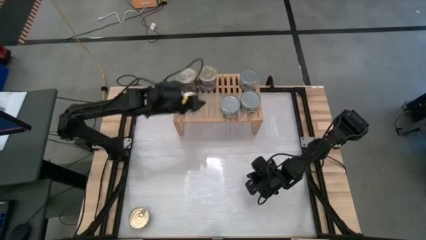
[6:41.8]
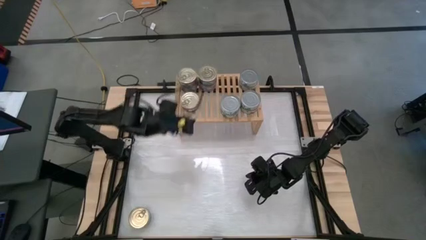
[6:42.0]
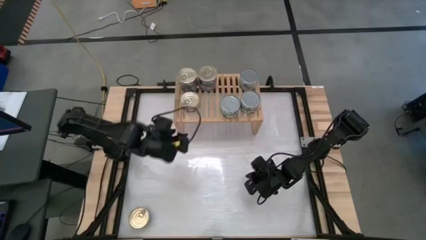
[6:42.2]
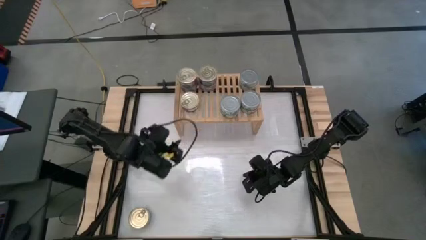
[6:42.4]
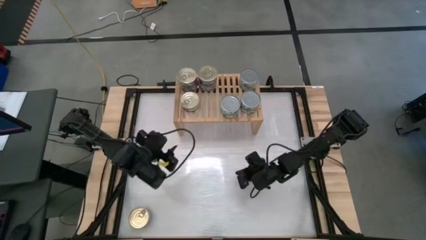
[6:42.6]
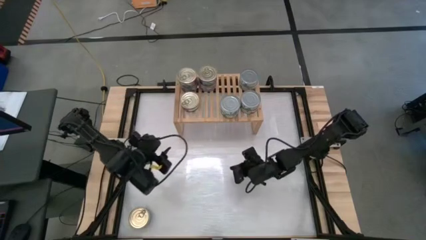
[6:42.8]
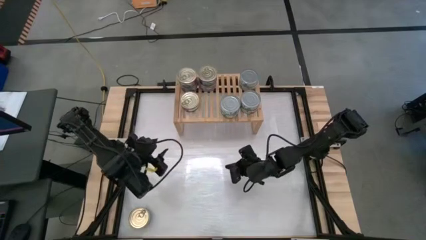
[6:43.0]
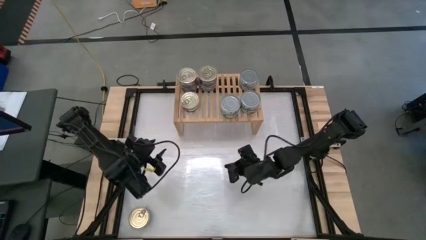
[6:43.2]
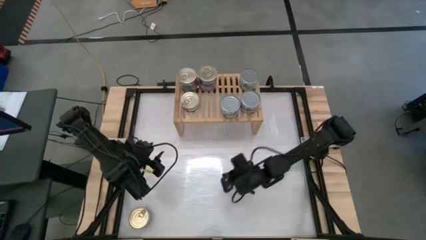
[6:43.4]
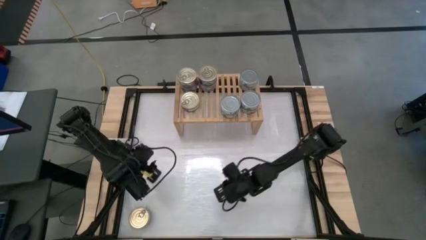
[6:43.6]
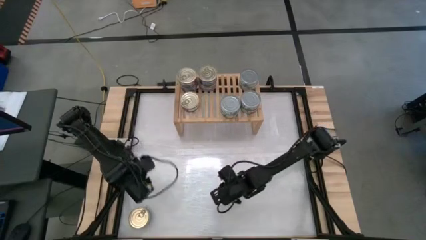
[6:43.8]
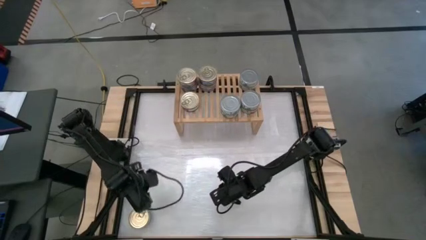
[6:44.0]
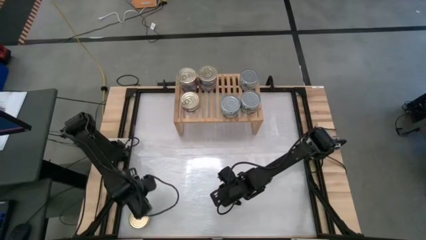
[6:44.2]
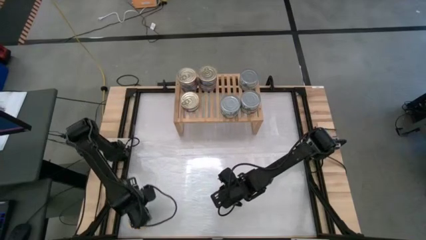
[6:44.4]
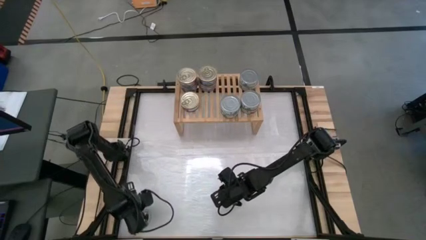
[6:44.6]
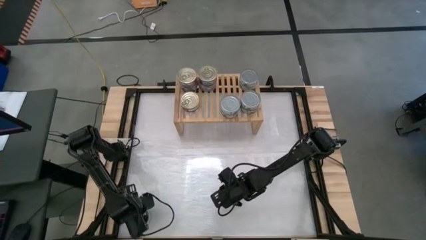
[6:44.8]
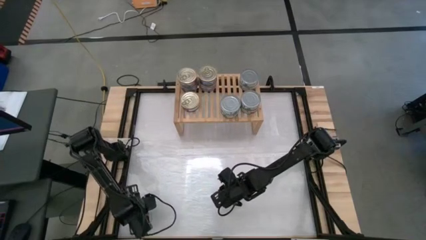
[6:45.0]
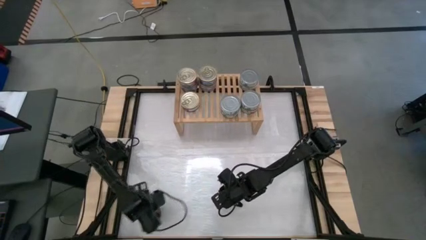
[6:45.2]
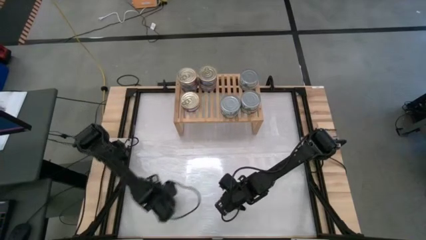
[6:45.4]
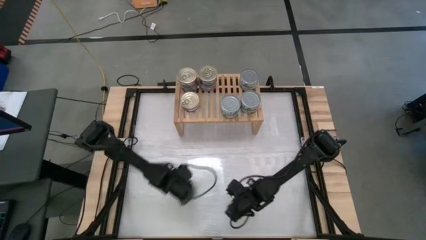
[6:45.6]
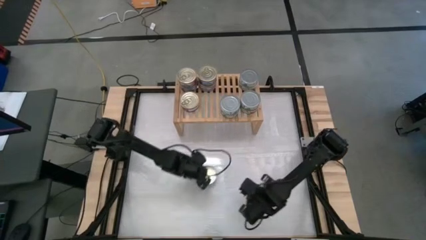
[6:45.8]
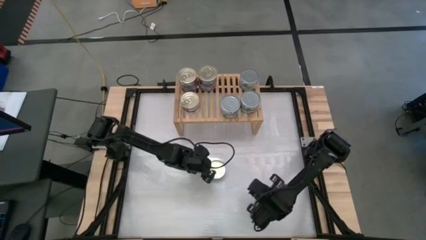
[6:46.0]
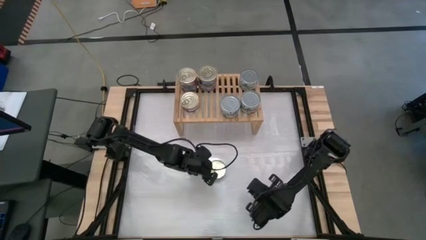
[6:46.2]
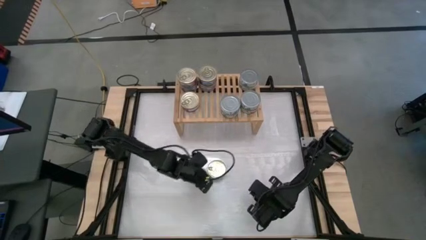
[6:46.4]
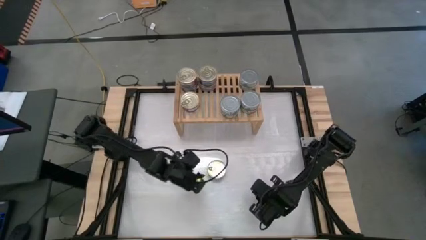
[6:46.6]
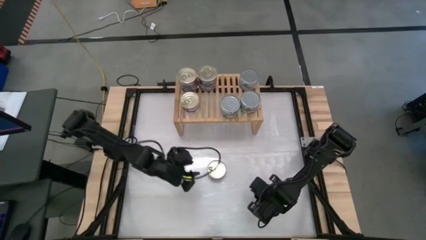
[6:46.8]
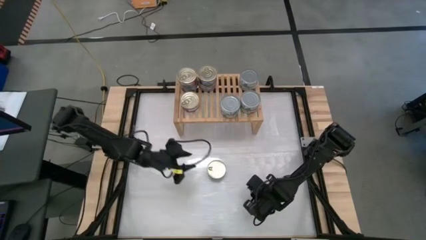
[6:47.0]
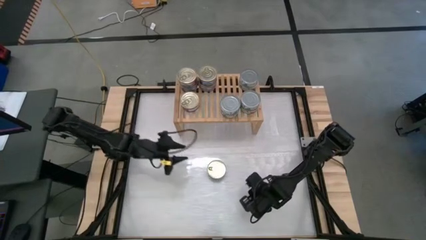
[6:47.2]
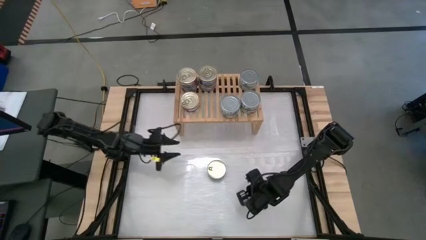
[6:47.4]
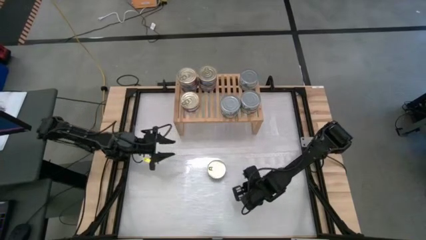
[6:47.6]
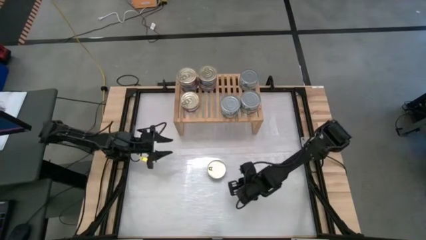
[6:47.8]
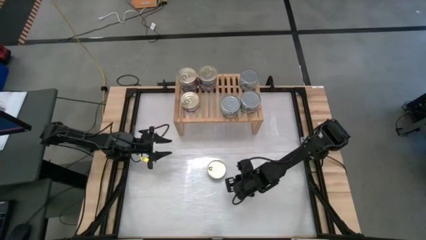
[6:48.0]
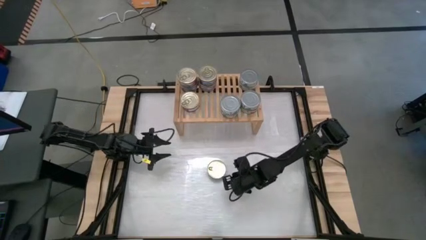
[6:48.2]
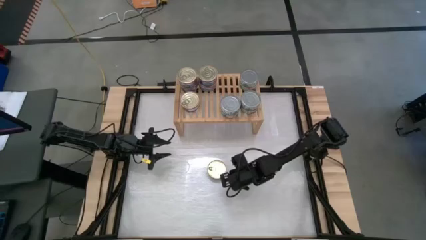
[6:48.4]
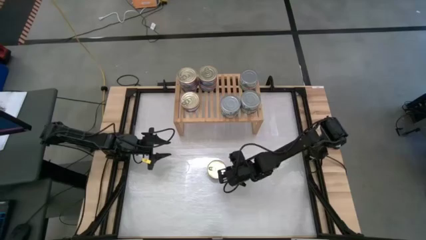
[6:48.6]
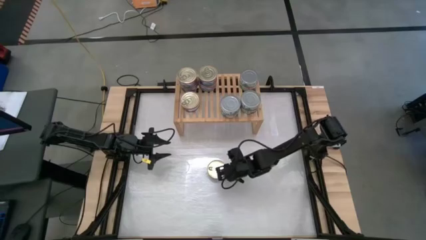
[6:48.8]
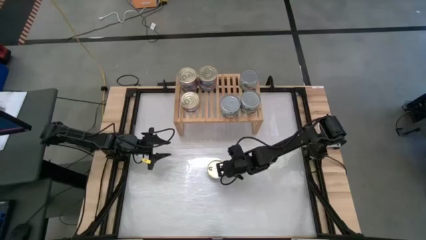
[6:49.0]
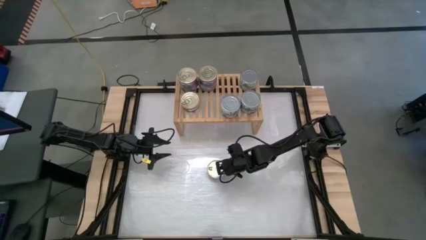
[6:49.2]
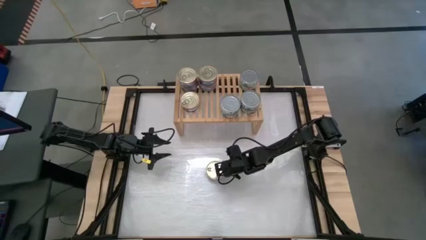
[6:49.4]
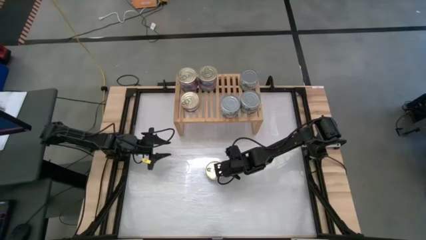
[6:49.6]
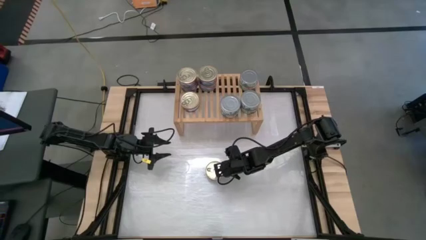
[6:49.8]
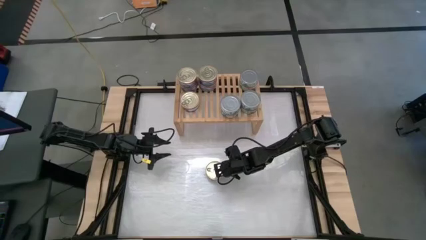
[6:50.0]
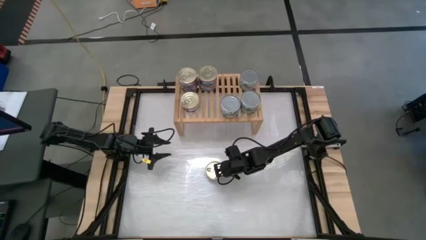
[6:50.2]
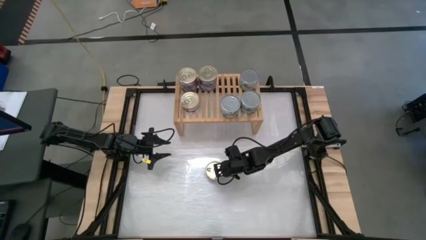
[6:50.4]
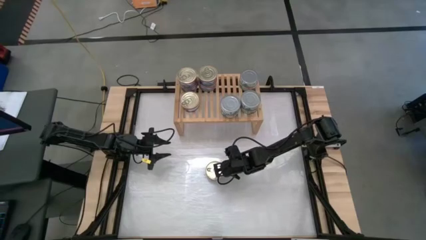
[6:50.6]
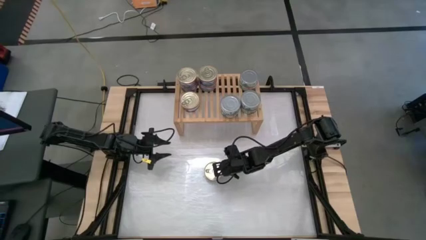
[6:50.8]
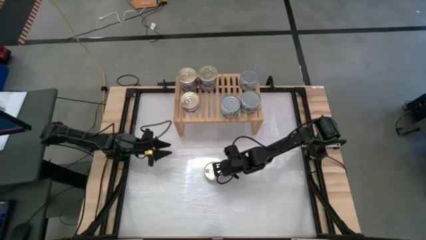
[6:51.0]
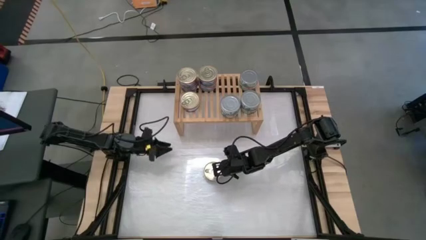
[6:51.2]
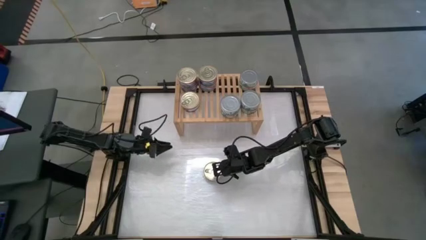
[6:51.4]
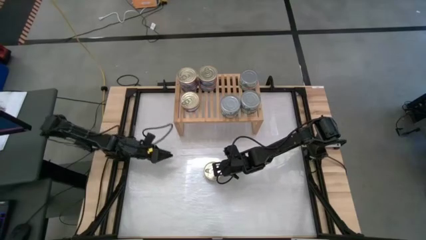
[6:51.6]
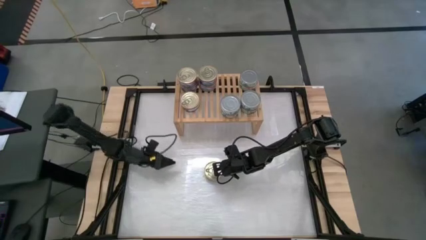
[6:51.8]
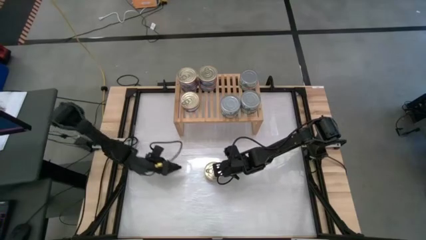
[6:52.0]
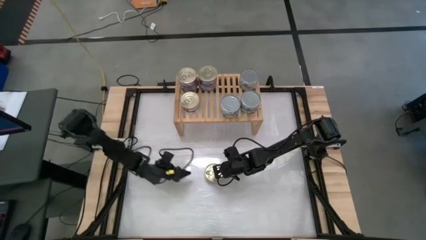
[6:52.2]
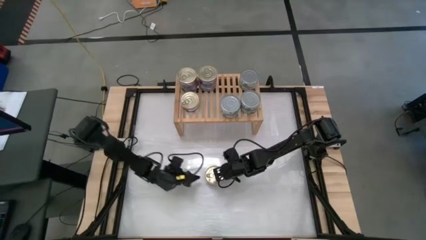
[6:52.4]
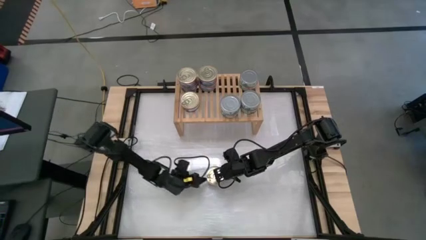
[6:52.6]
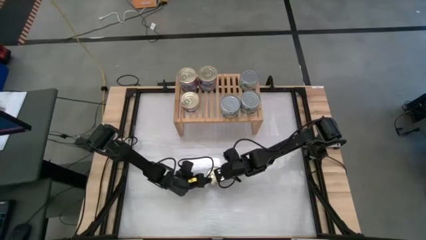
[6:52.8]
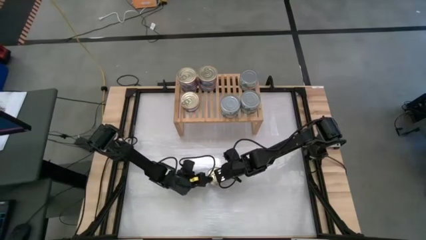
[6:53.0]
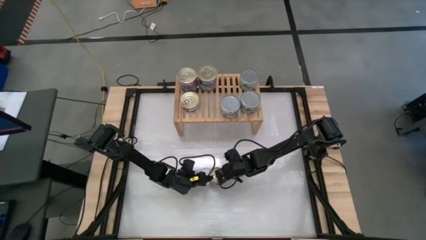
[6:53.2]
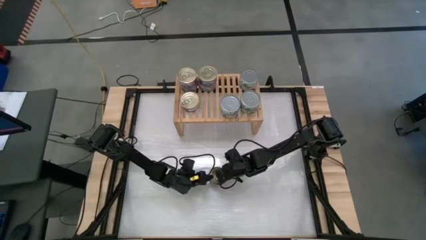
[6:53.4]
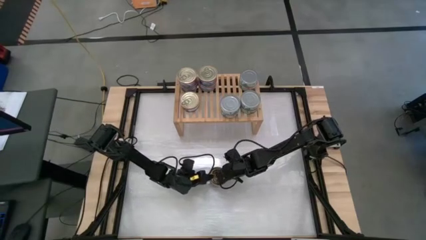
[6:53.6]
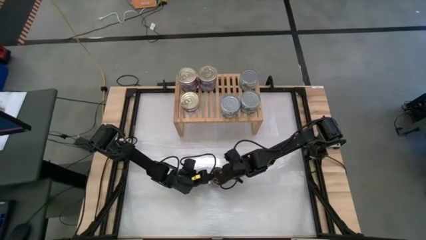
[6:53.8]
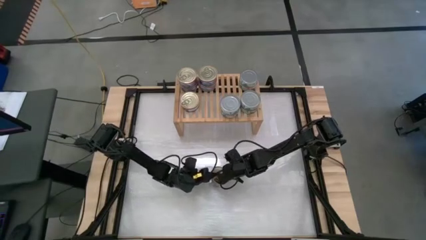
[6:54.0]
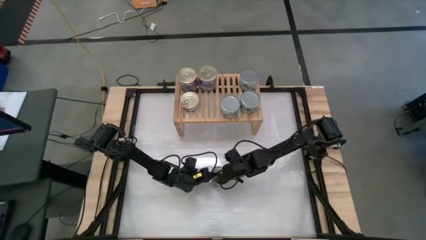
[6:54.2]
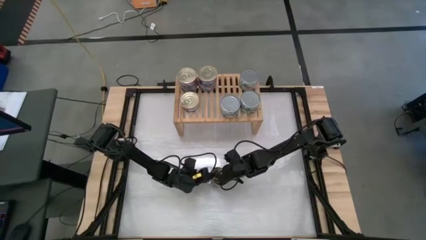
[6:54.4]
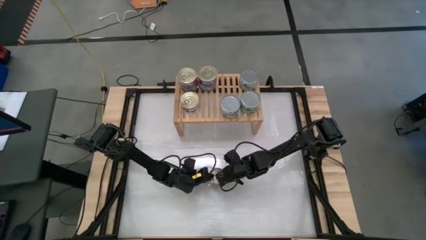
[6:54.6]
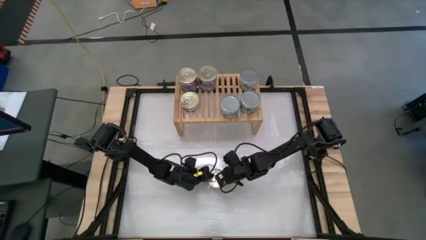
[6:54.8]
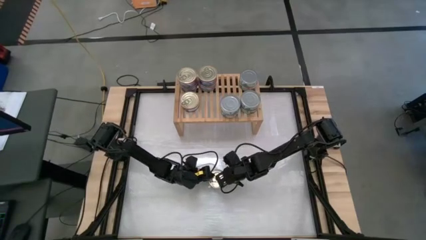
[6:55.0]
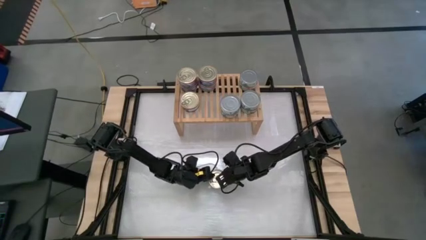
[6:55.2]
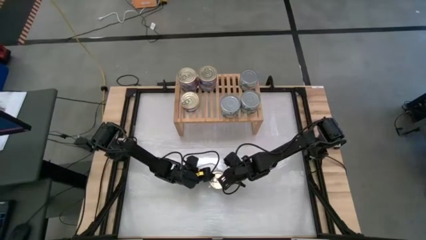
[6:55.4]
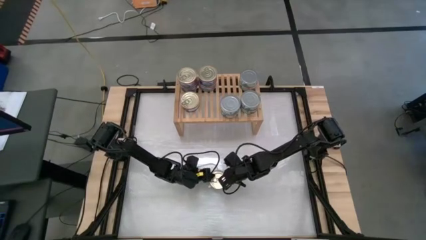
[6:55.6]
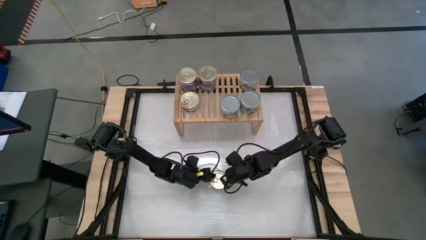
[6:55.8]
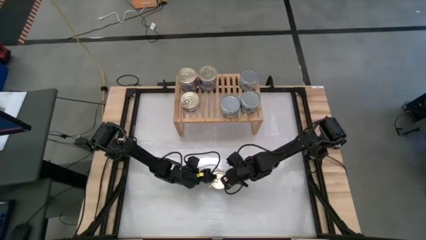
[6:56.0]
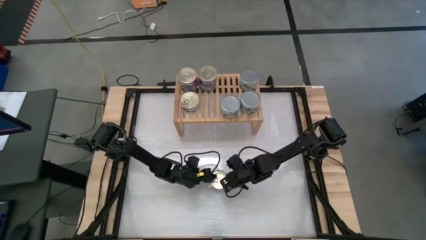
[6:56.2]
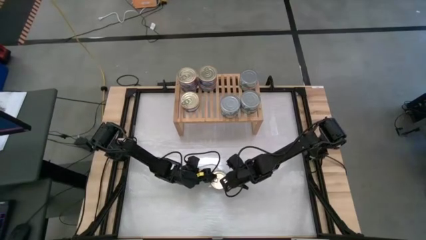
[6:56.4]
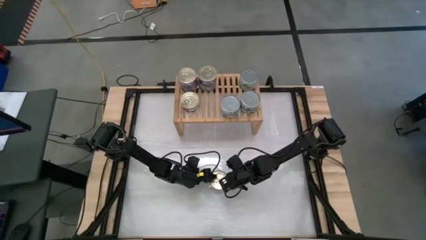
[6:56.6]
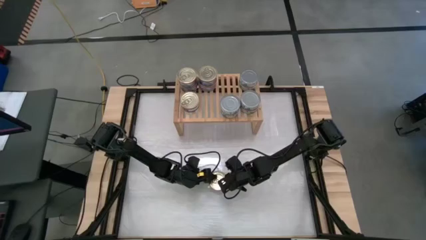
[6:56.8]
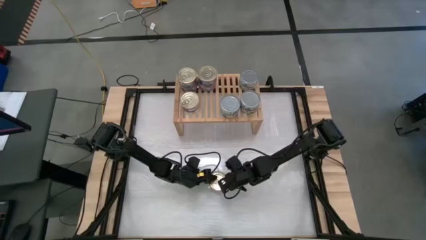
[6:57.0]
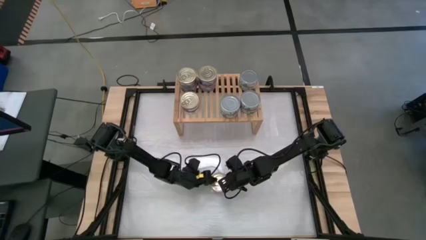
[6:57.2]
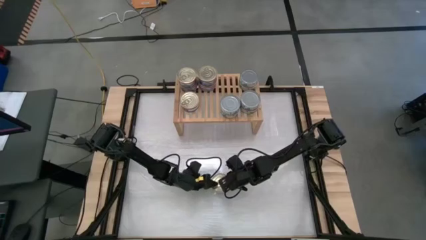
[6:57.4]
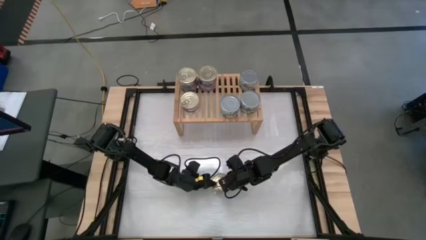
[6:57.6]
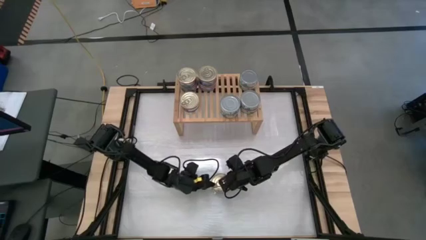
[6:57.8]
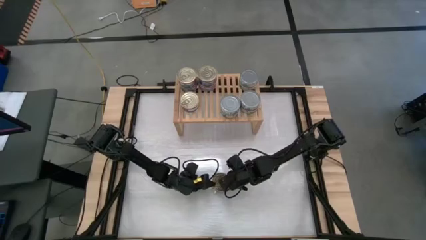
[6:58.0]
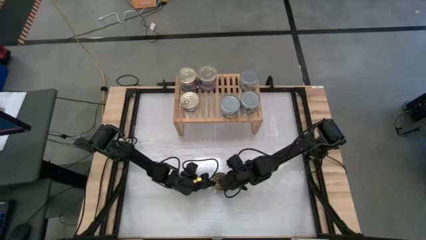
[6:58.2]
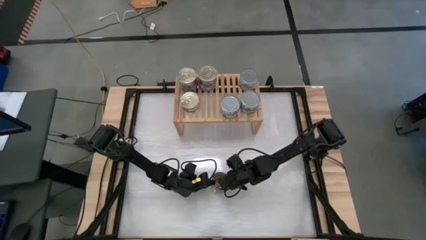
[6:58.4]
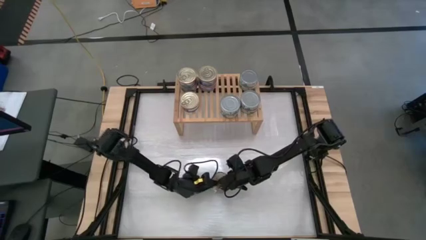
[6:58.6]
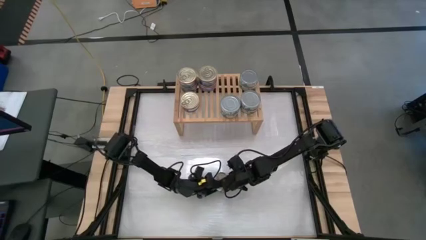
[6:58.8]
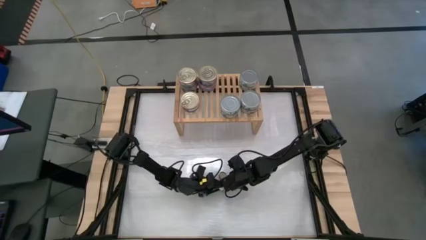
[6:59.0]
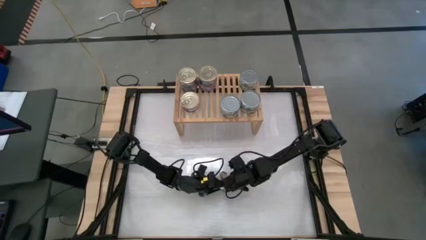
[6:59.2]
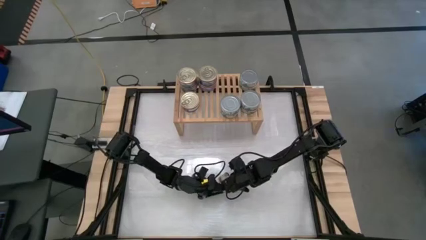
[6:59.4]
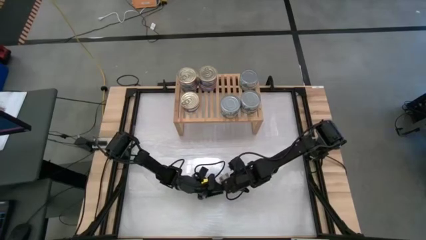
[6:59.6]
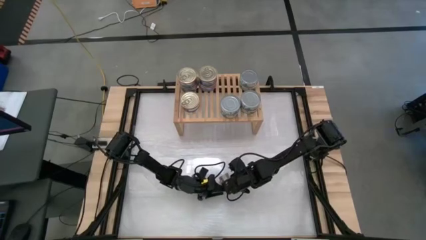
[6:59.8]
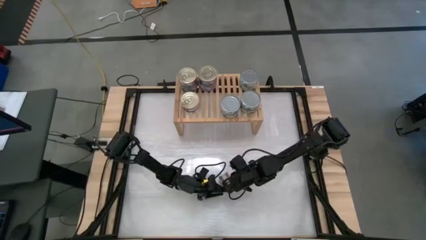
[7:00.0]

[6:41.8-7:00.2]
Task: Stack canned seafood by type on shelf
Stack the blue-pink tuna can on top of the other blue-pink tuna can on the shelf
